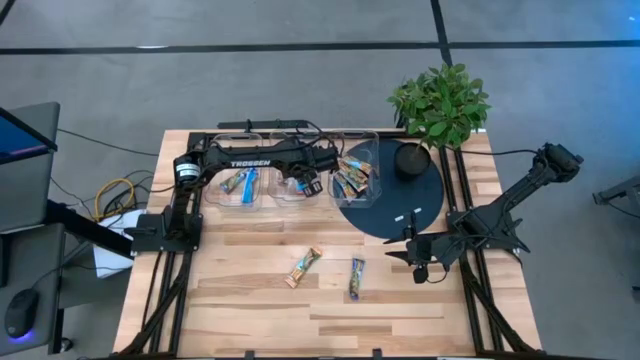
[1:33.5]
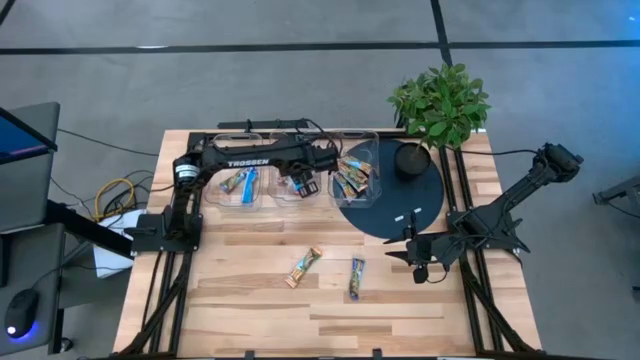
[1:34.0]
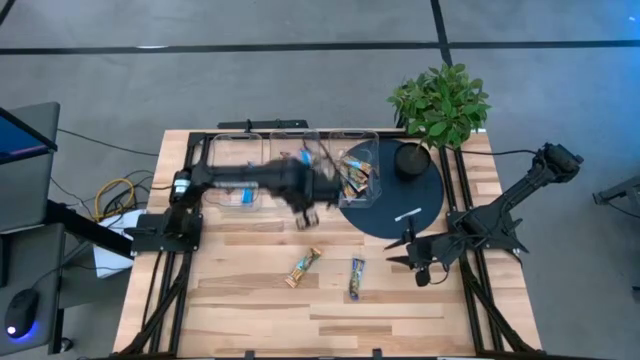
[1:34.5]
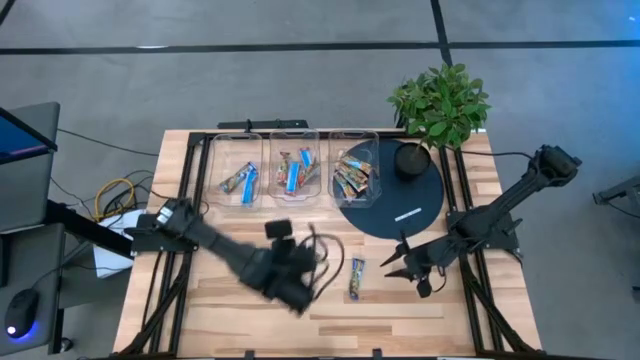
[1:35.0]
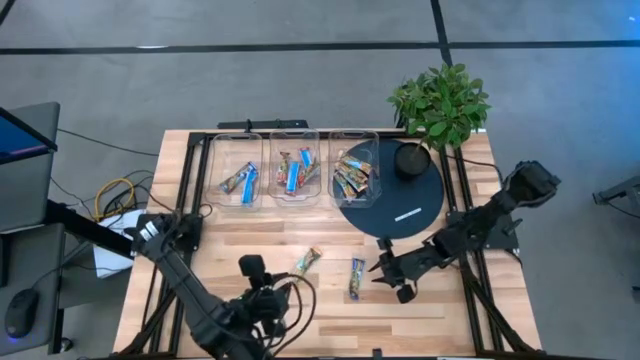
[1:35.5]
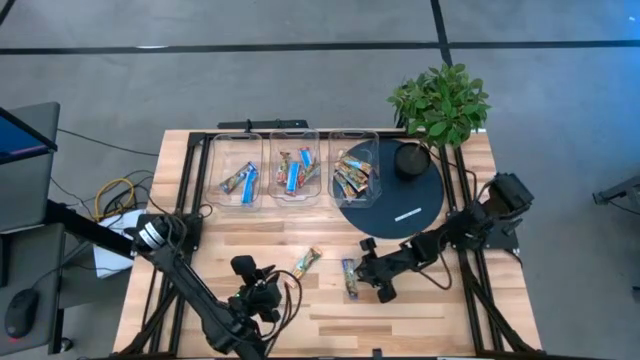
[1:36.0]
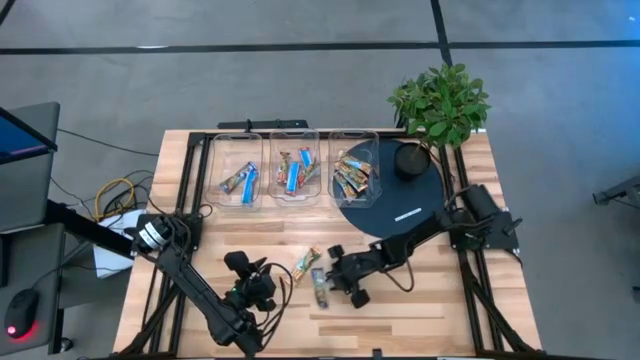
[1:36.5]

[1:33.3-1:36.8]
Task: Pick and place Granola Bars by type
Adjust the blue chocolate chip

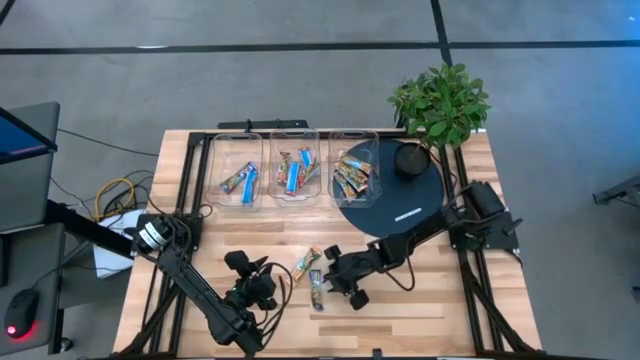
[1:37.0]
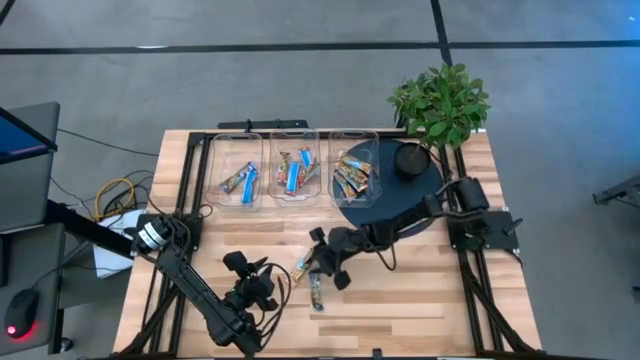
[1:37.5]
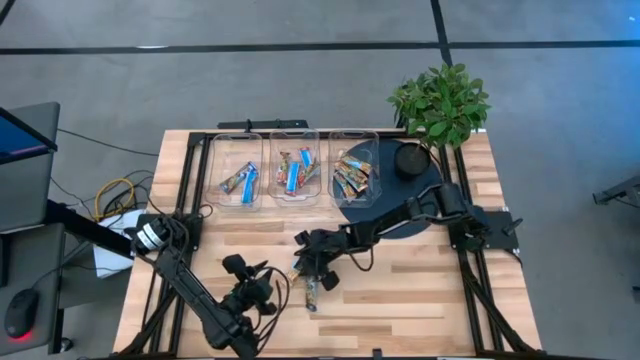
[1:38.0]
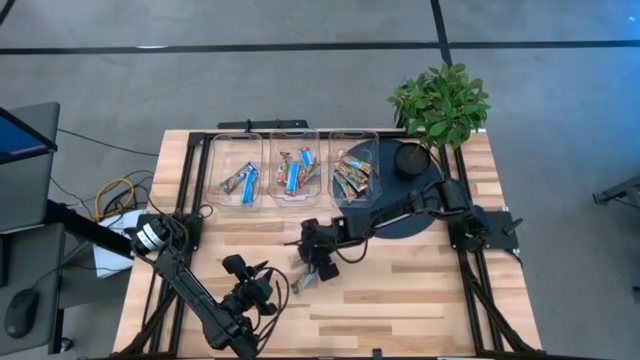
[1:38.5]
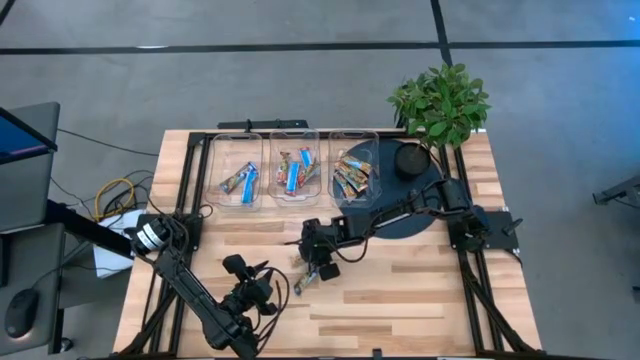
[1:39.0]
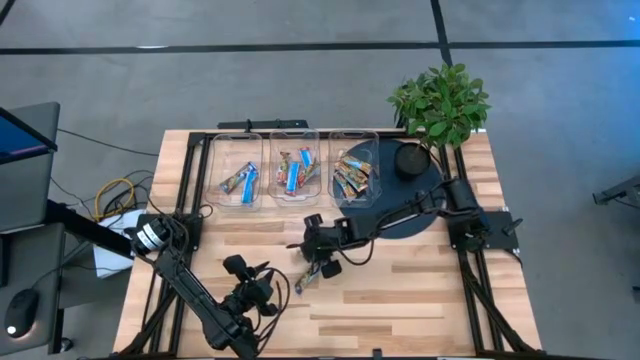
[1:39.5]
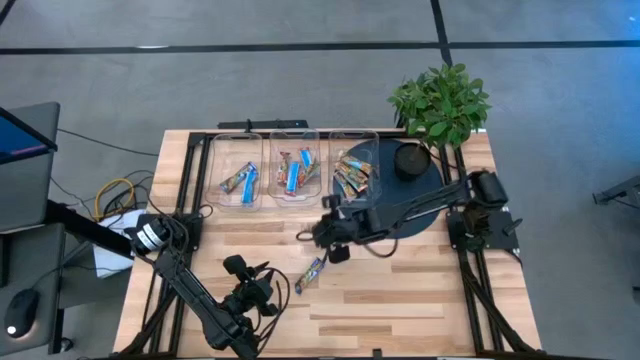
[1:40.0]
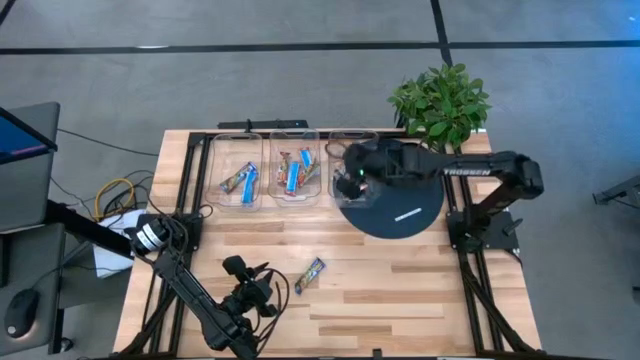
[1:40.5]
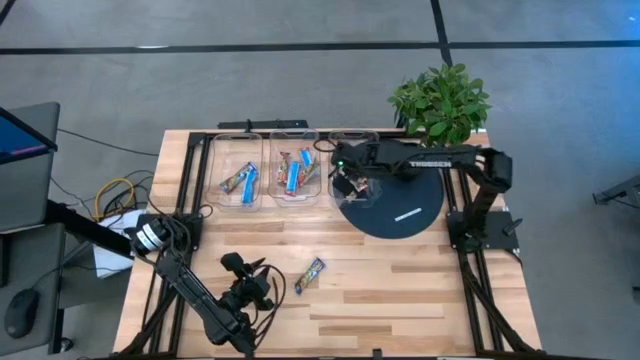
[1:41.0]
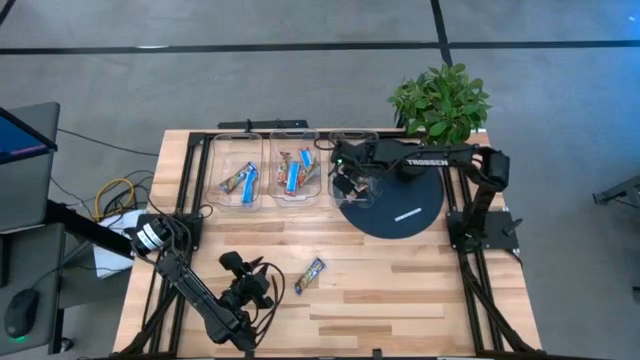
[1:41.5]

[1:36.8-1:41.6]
Put the orange chocolate chip into the right transparent bin

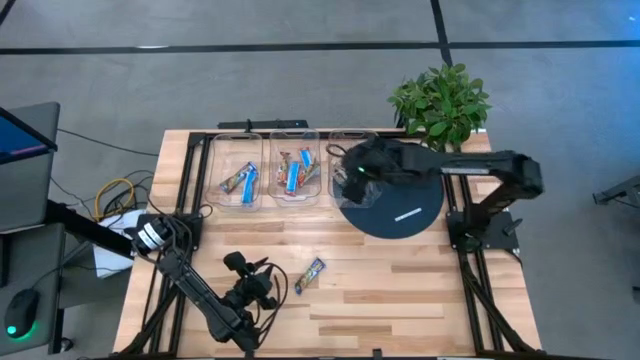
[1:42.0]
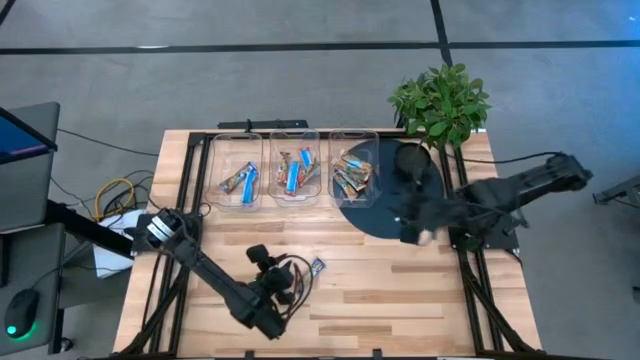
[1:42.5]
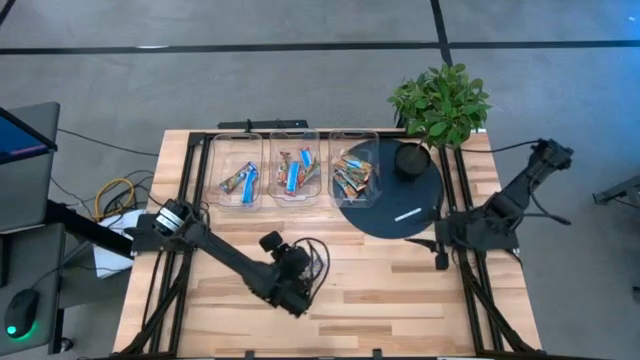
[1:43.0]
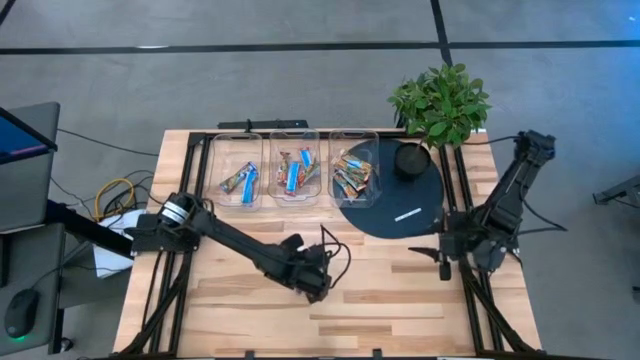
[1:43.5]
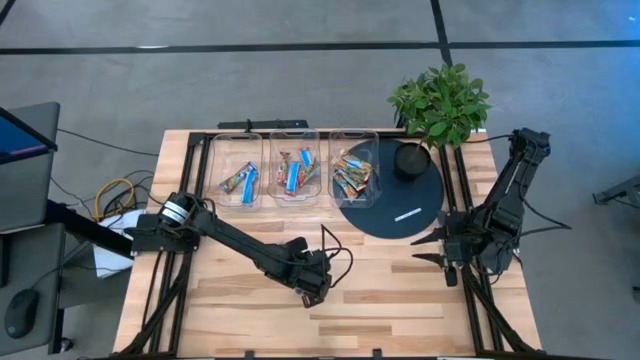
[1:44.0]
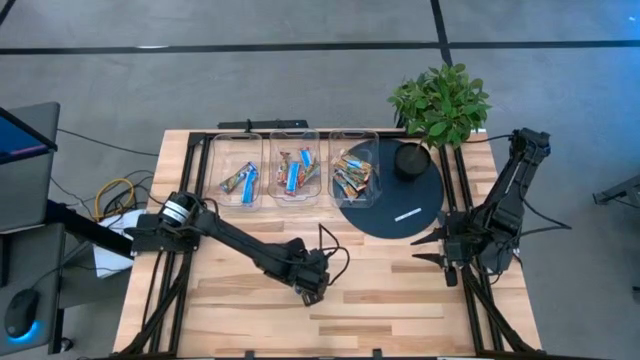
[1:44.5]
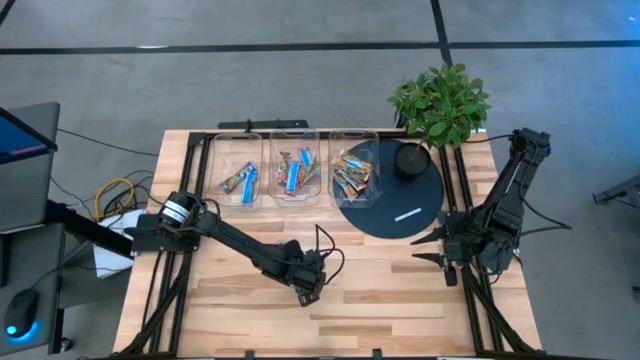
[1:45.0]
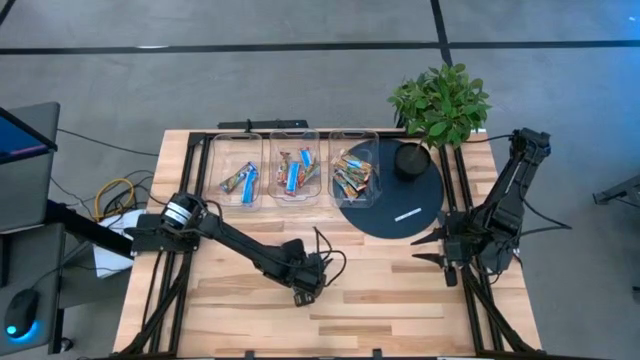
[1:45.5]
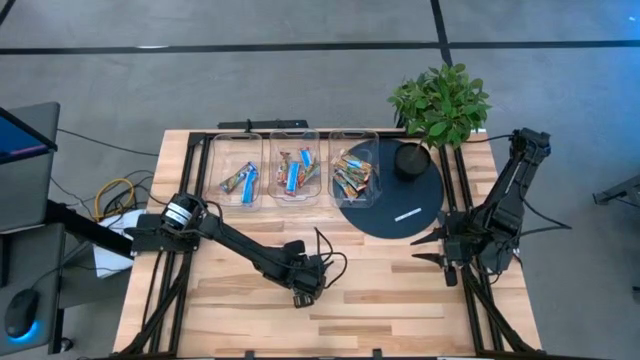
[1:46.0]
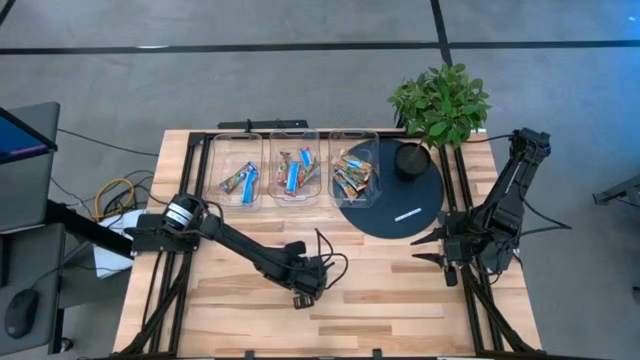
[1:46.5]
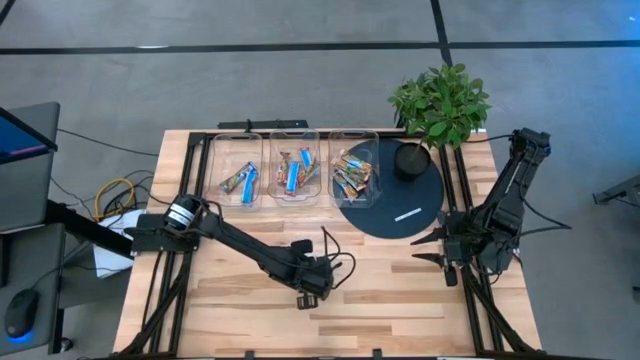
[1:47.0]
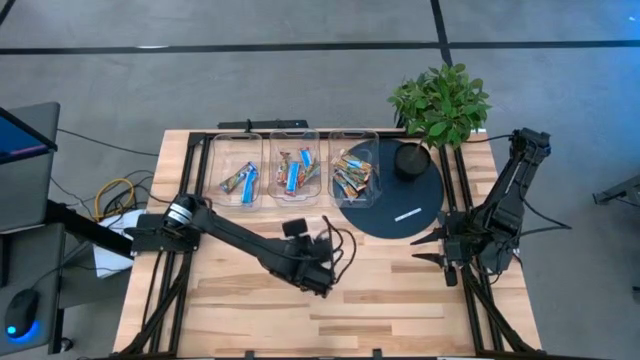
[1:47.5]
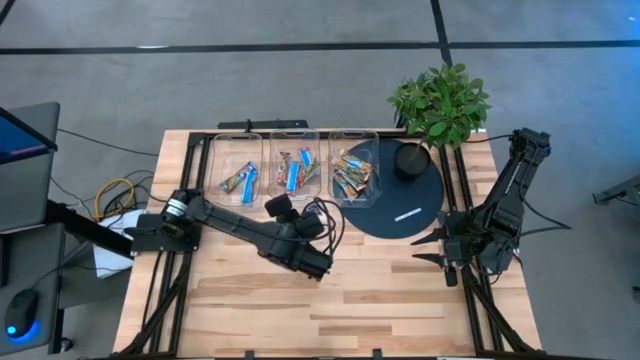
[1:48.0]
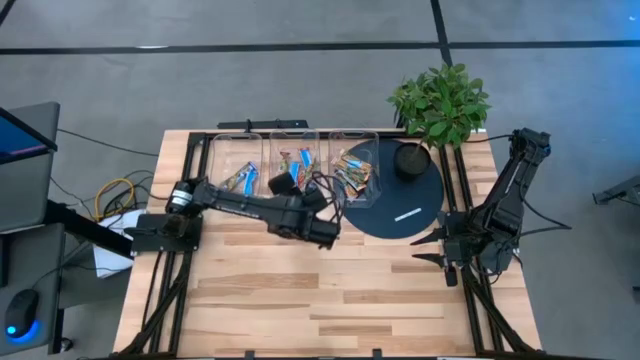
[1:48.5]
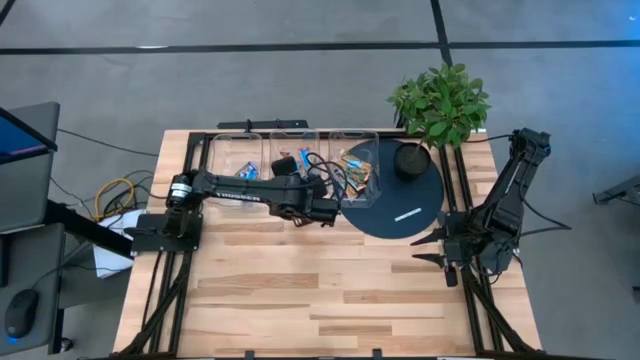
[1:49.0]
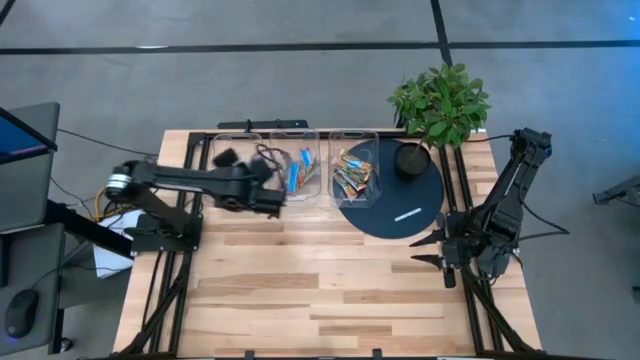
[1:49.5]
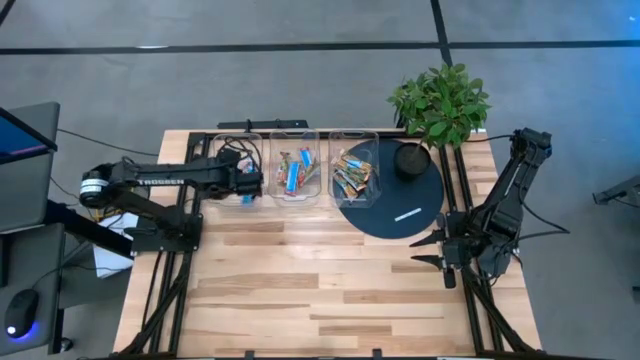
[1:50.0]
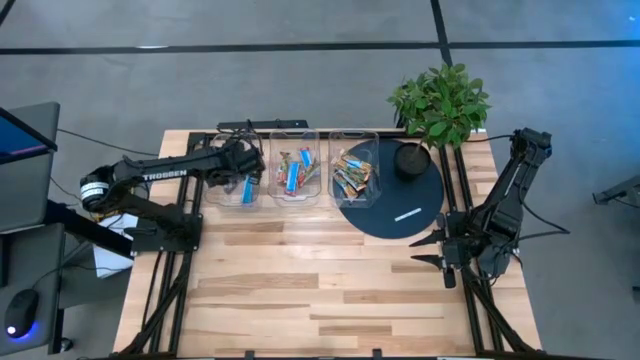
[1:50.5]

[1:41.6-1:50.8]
Put the blue chocolate chip into the left transparent bin

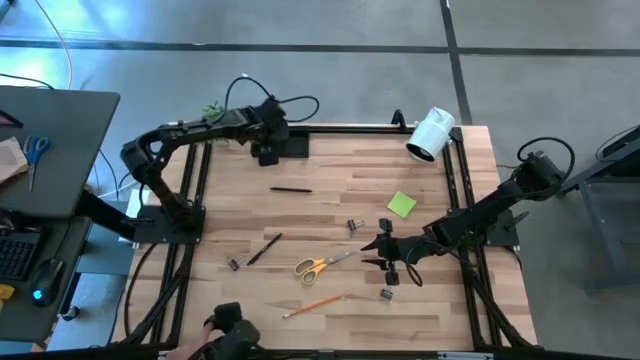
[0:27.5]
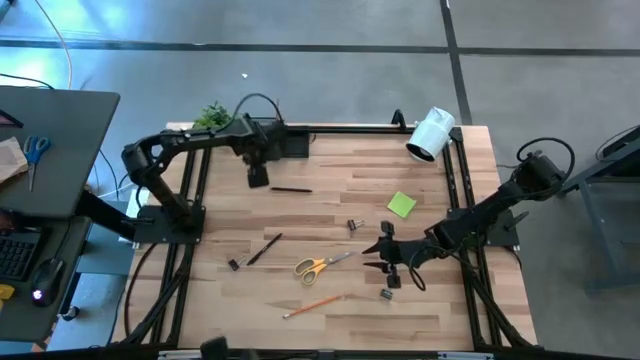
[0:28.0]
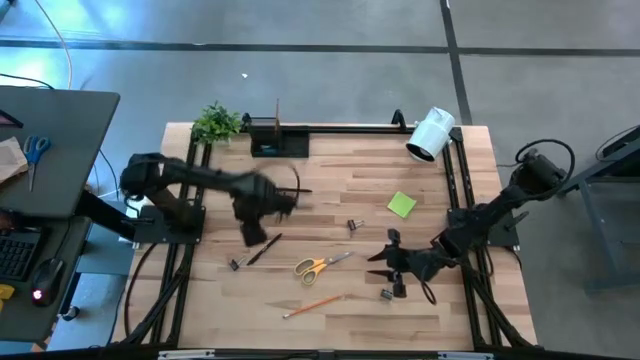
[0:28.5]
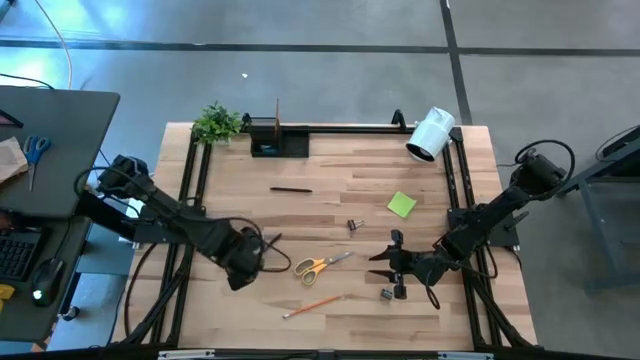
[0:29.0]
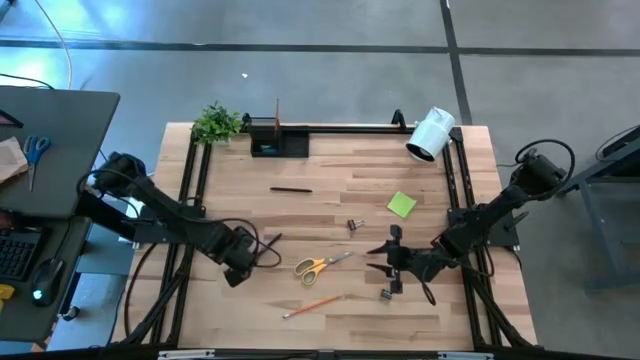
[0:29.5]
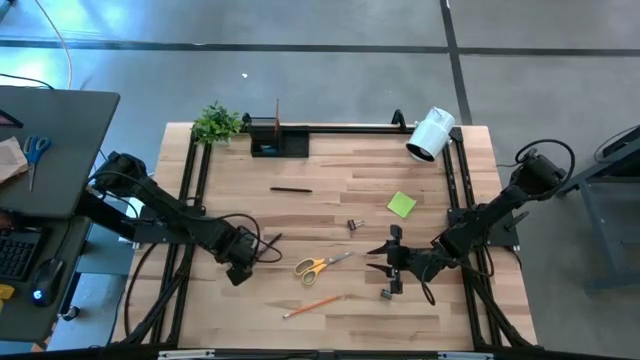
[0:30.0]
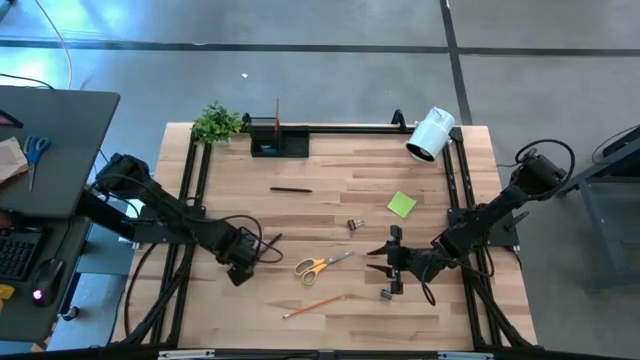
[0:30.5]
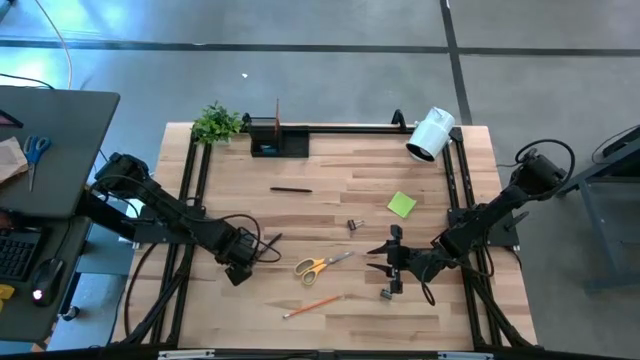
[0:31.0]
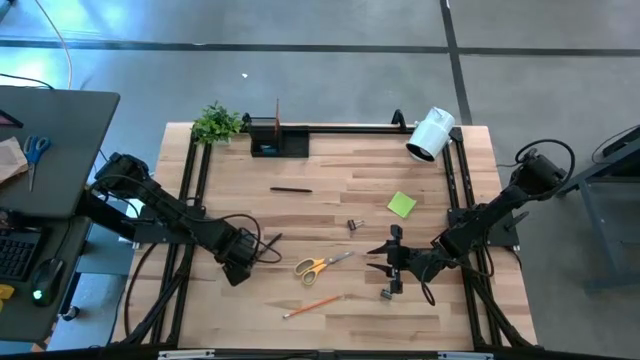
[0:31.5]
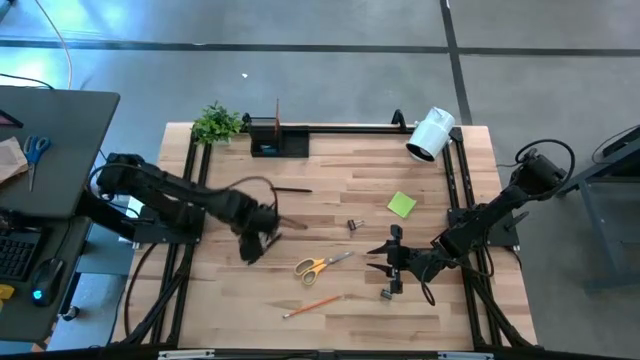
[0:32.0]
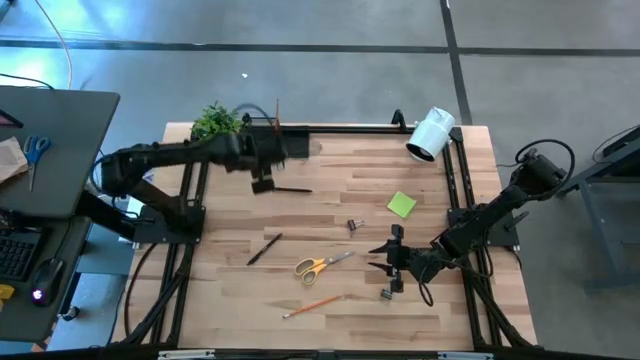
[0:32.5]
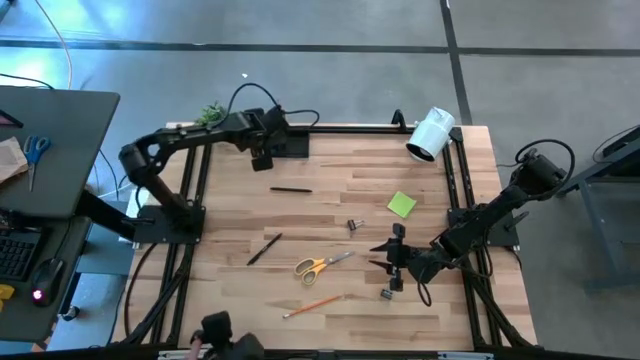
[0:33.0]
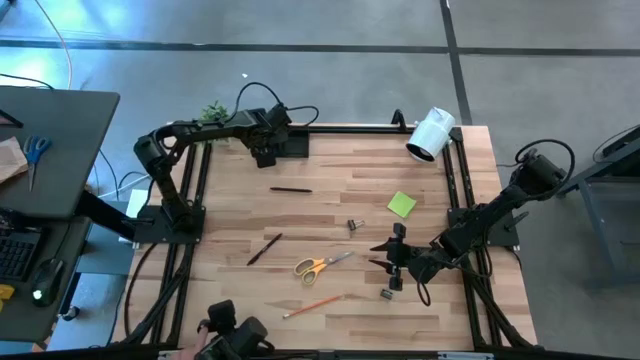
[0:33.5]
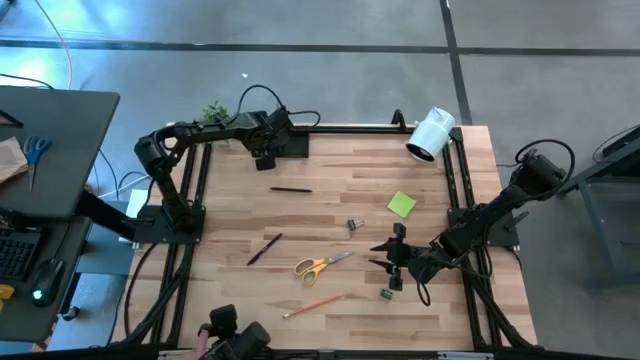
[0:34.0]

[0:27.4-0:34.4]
Task: Pick and place office supplies into organizer
Put the left black binder clip into the bottom left section of the desk organizer
